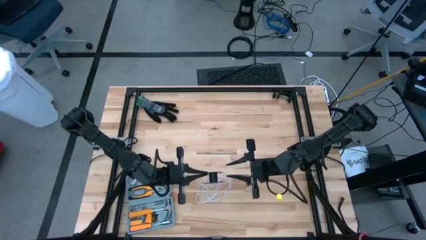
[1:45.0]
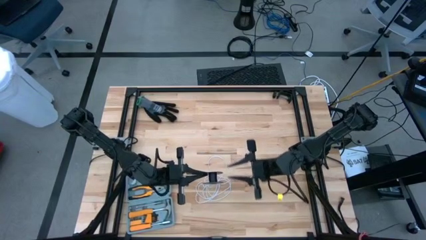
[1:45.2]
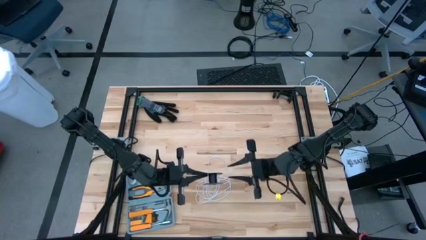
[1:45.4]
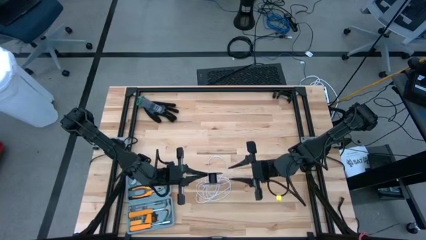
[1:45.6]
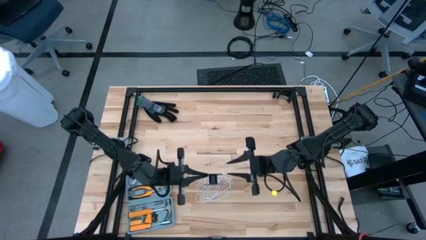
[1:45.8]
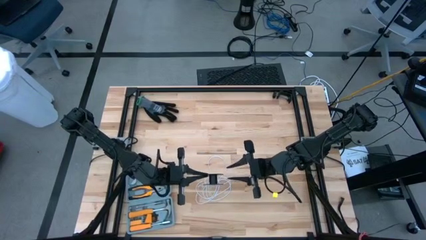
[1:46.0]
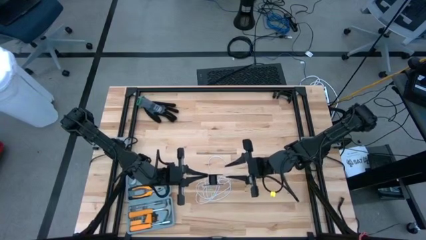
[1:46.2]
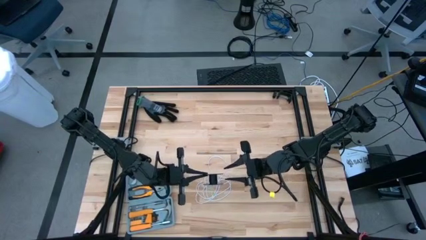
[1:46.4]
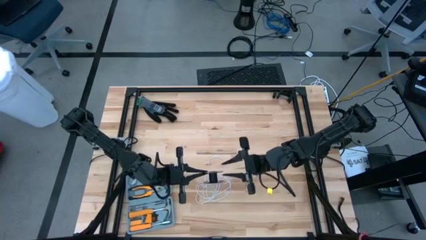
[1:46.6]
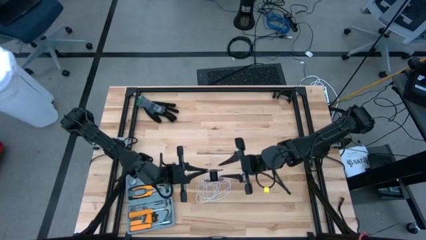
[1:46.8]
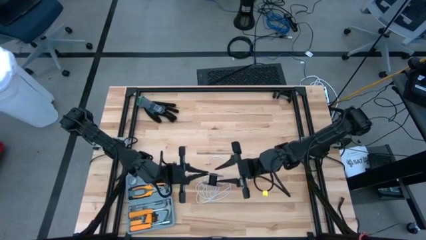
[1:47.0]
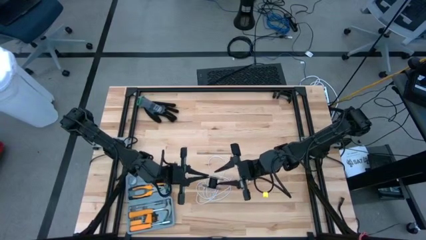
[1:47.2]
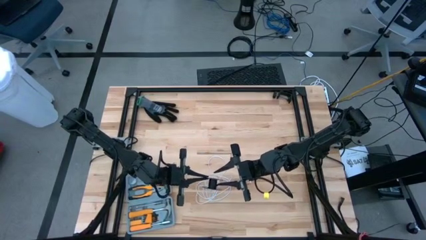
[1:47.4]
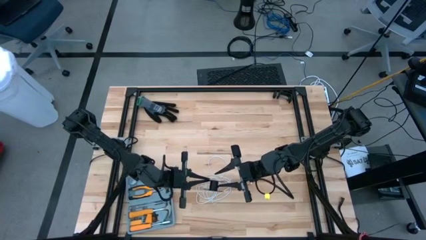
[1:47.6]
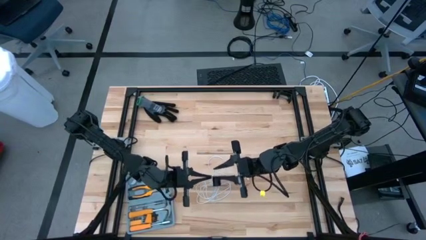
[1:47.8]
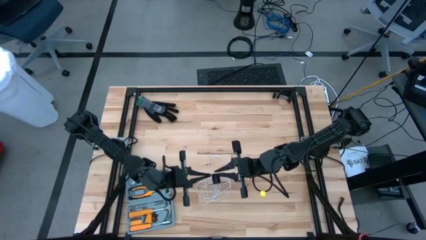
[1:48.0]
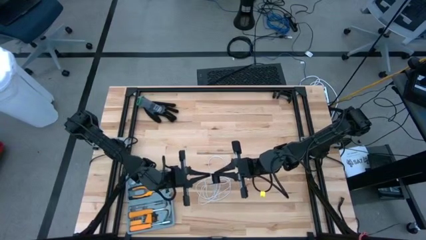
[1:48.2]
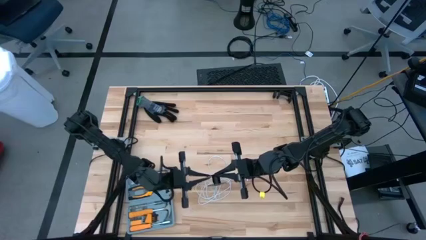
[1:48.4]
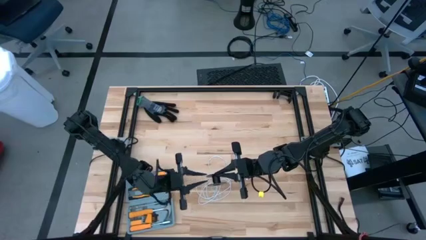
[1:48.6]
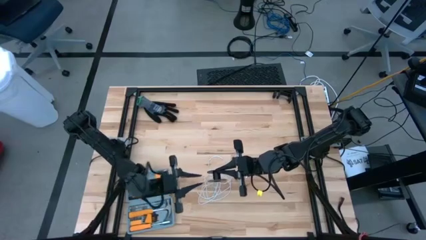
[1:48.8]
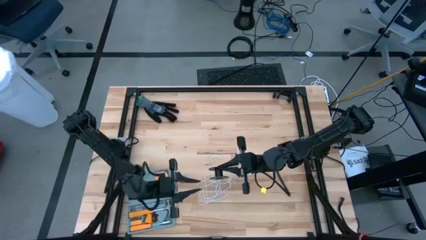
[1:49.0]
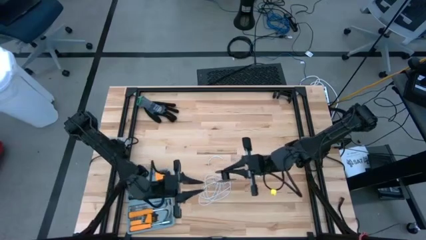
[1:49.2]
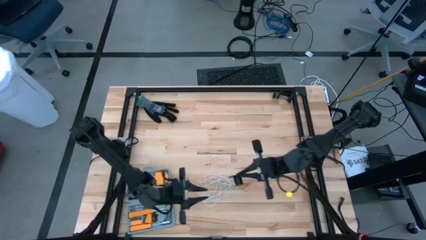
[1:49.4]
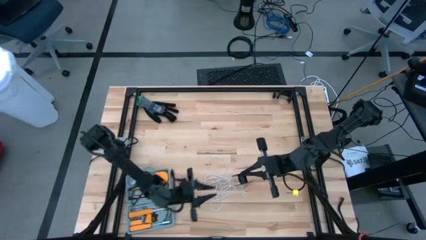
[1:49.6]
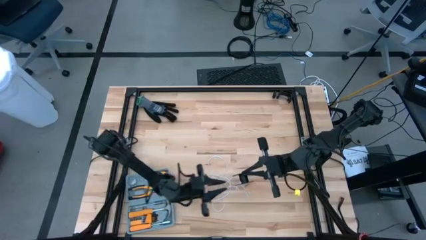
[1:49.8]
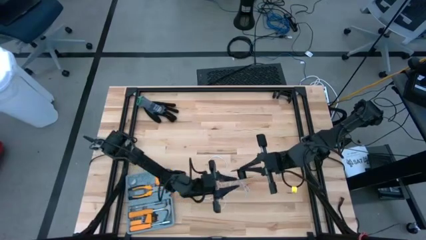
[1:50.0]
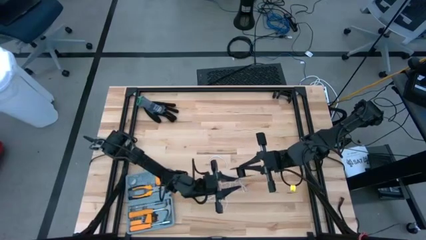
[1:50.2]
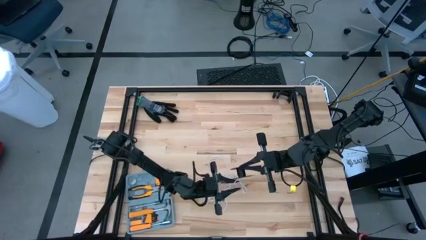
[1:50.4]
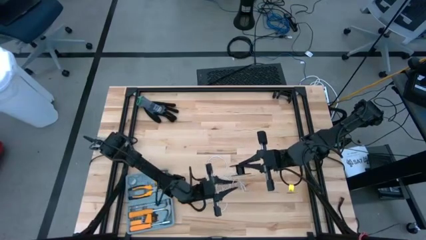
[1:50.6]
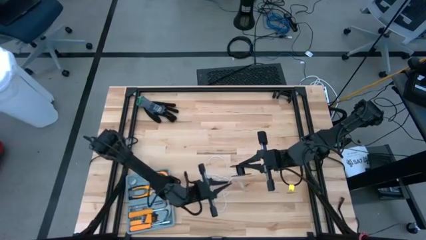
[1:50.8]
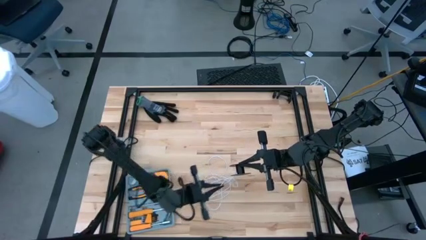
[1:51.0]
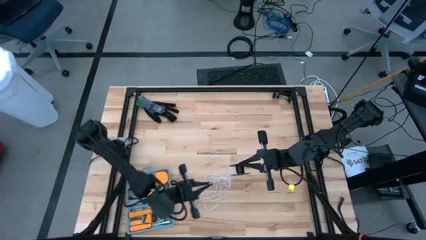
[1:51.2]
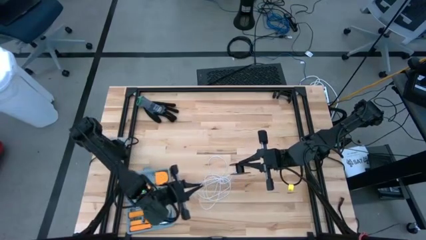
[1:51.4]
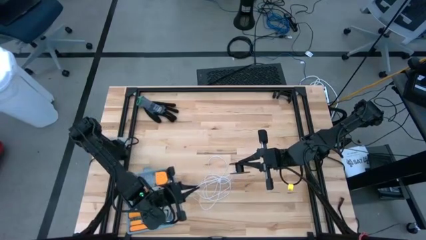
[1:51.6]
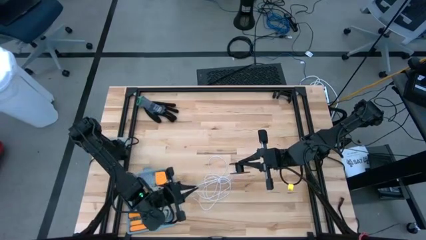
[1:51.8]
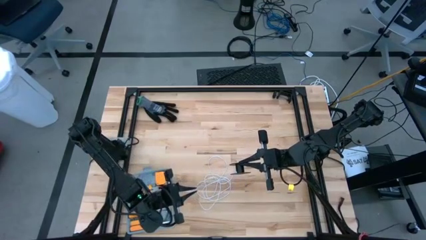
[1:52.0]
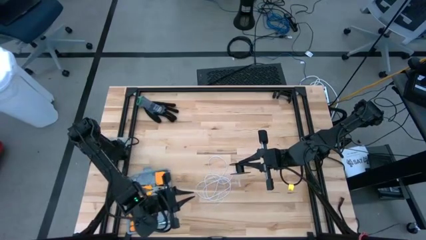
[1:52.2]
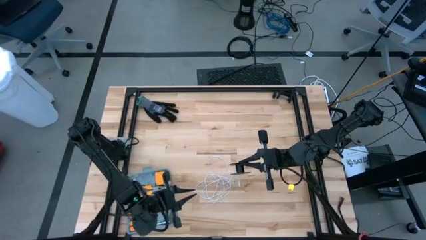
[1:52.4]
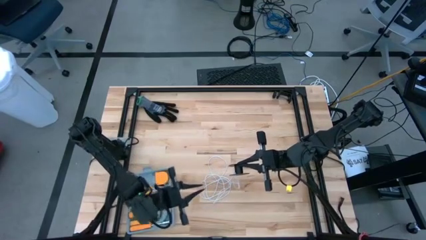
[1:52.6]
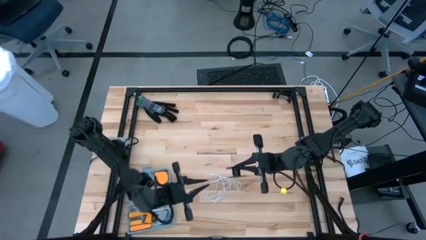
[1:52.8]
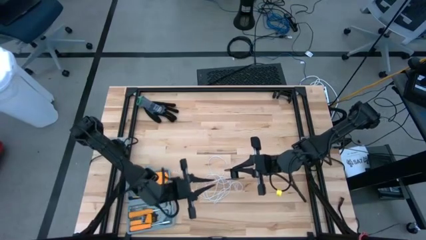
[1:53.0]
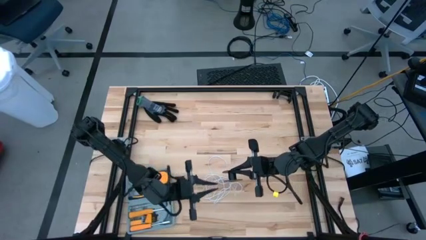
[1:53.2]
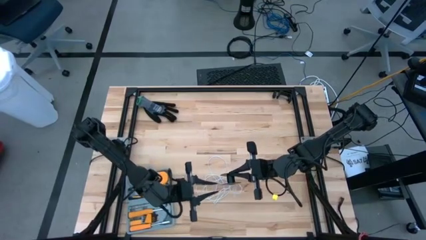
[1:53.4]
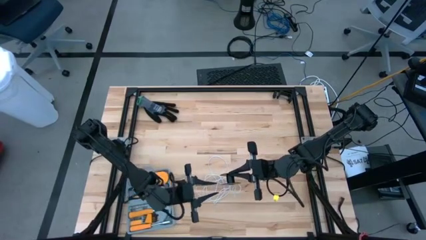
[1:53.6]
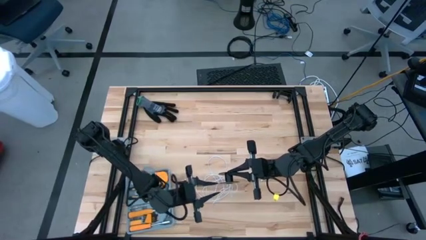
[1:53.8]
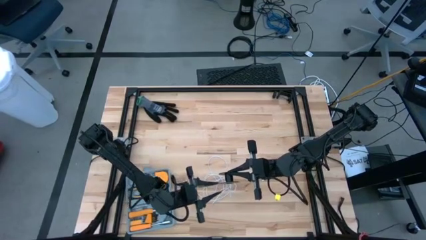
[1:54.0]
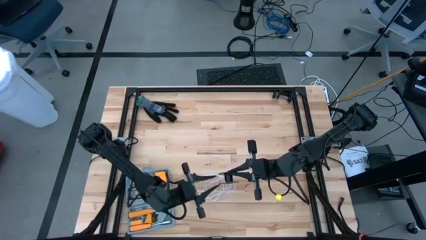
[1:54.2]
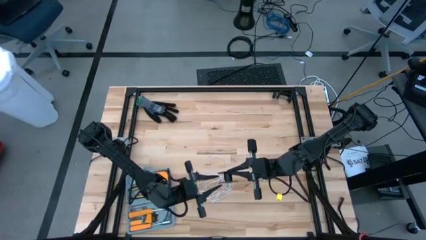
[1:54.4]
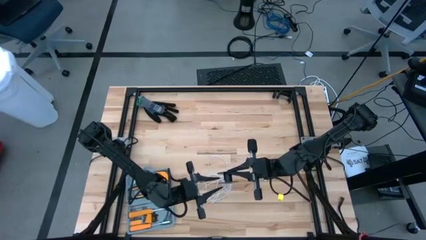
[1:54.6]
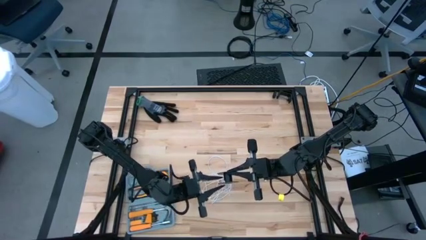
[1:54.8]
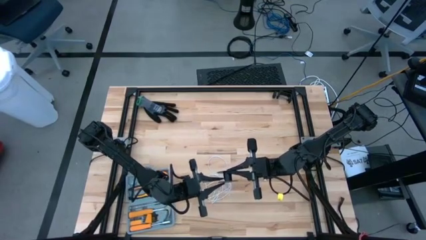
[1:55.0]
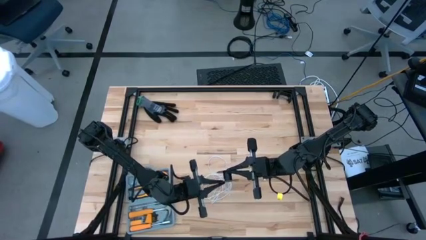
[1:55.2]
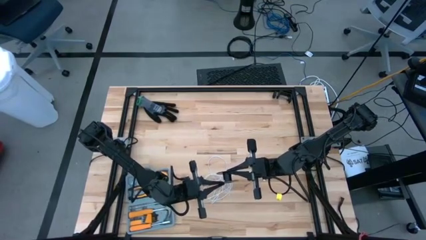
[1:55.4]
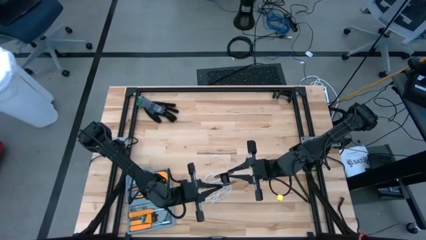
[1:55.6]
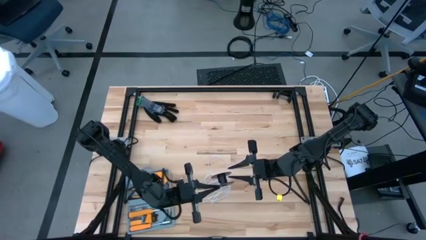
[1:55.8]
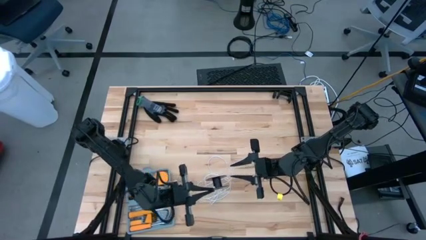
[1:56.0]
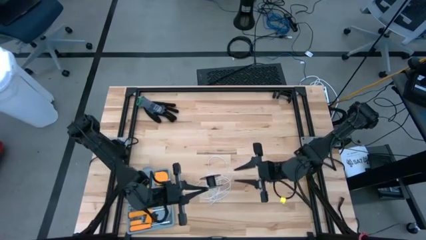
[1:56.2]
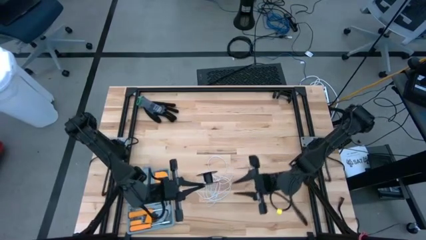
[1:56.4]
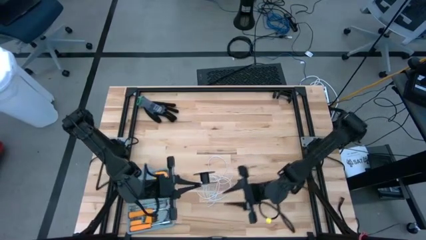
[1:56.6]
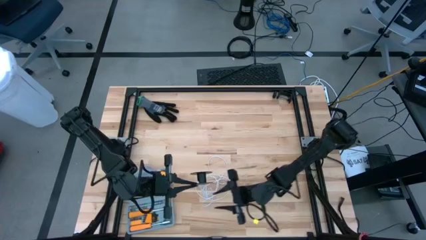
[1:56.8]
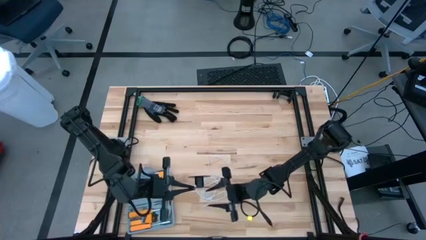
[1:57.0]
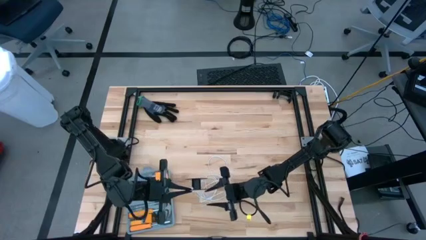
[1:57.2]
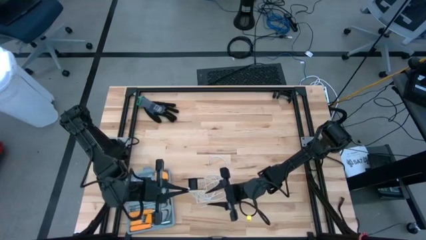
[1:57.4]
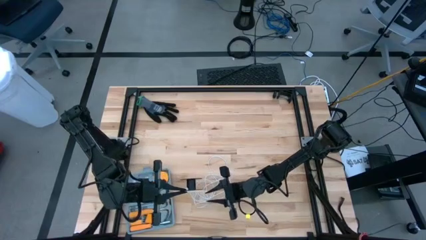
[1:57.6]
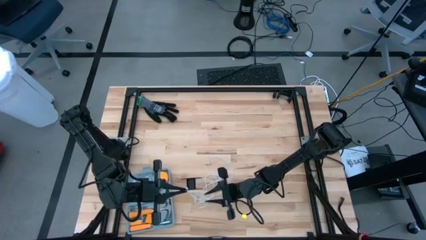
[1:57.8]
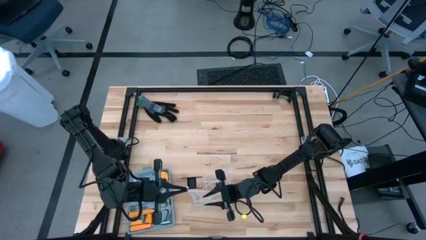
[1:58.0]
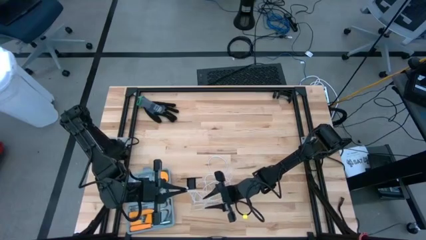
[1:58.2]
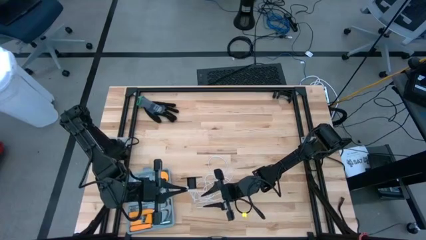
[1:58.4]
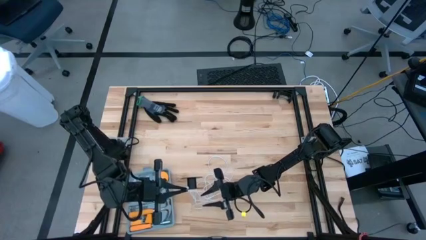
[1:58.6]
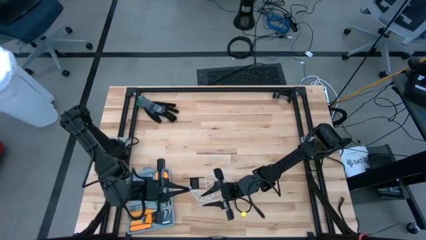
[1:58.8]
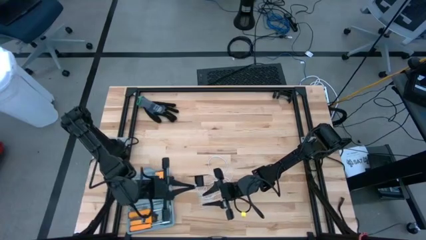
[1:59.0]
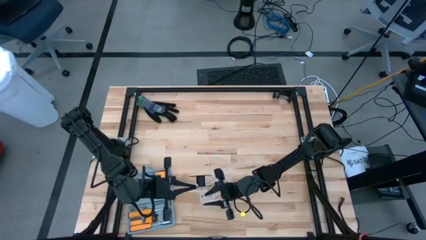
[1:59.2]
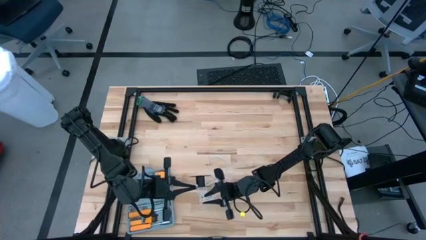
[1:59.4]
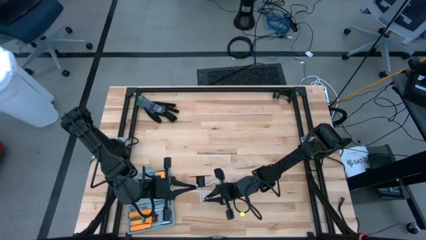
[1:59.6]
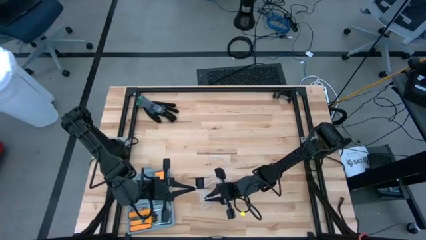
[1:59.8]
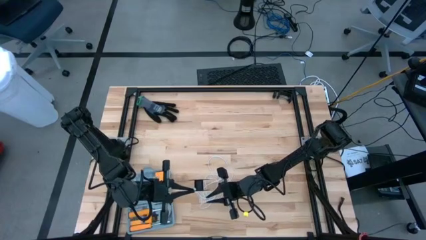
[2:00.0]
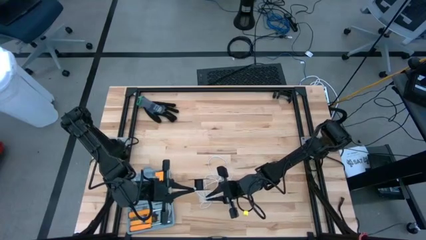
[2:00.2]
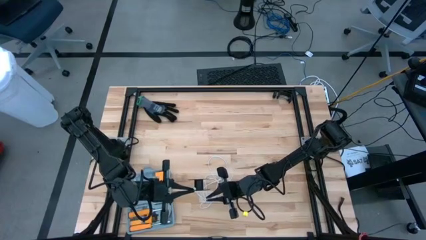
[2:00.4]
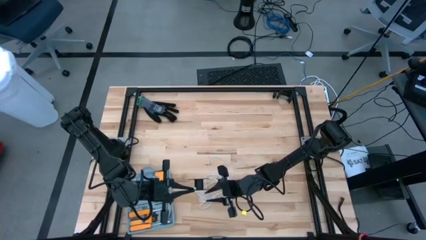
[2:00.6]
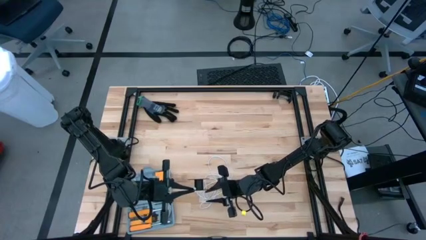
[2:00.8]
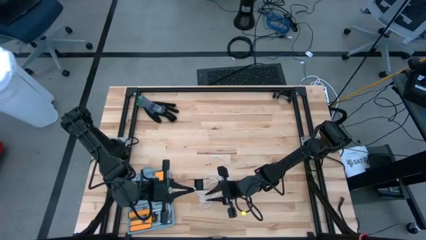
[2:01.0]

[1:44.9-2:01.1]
Task: Coil cords
Coil the white cable wire into the spool
